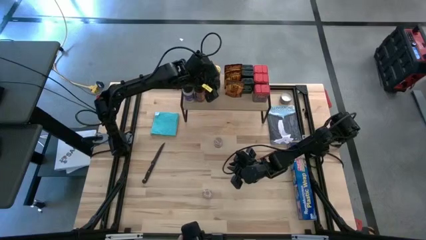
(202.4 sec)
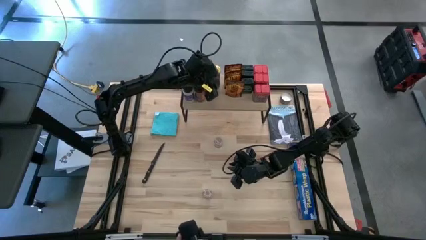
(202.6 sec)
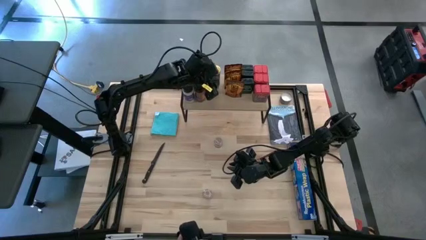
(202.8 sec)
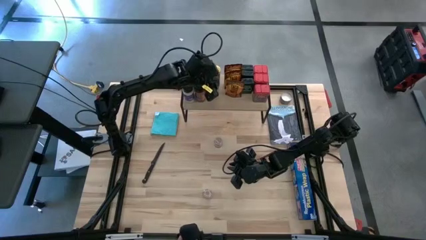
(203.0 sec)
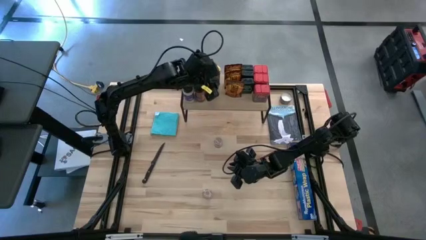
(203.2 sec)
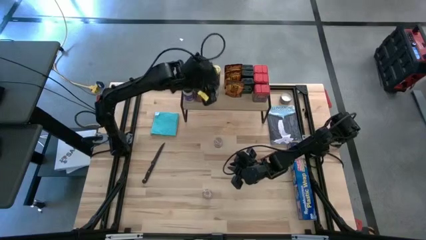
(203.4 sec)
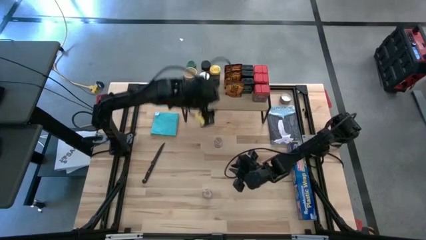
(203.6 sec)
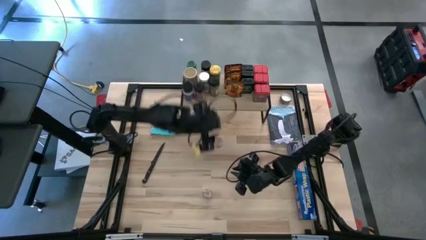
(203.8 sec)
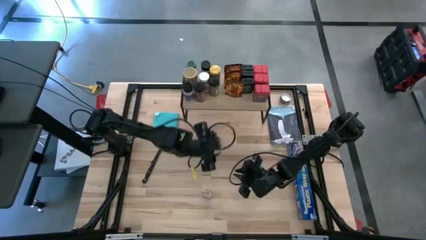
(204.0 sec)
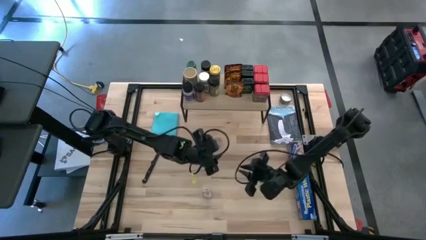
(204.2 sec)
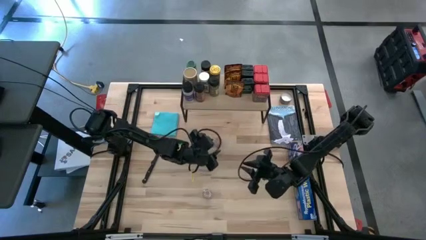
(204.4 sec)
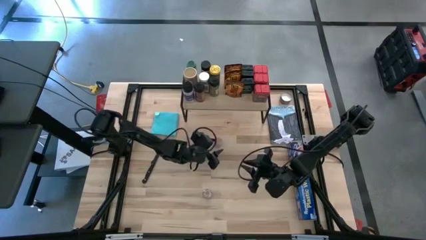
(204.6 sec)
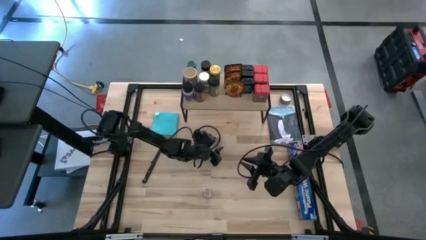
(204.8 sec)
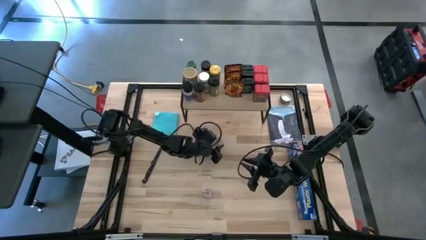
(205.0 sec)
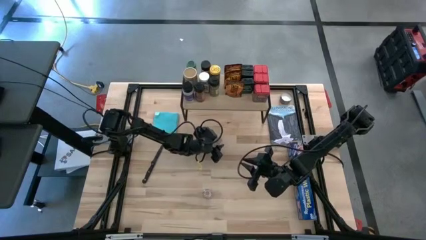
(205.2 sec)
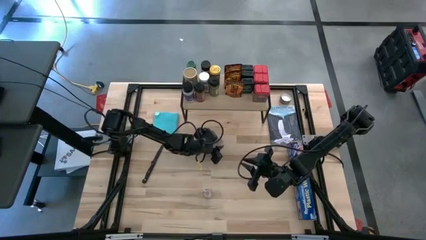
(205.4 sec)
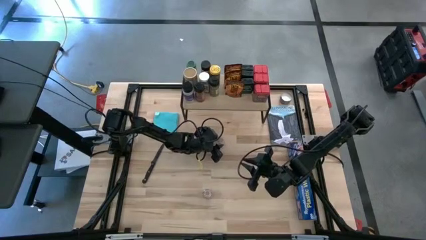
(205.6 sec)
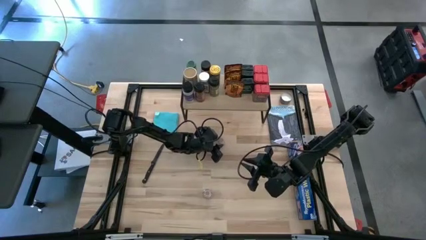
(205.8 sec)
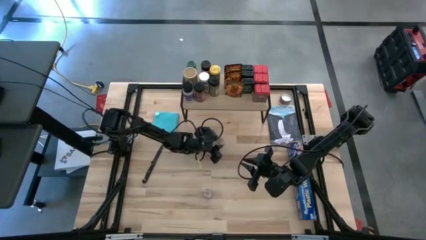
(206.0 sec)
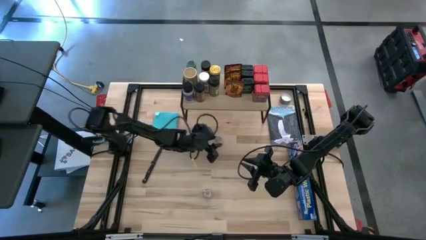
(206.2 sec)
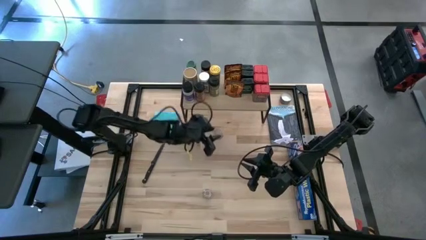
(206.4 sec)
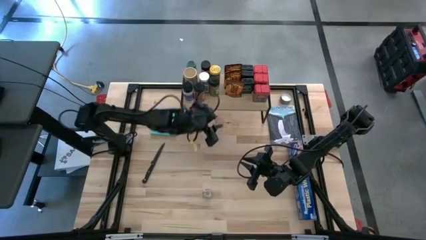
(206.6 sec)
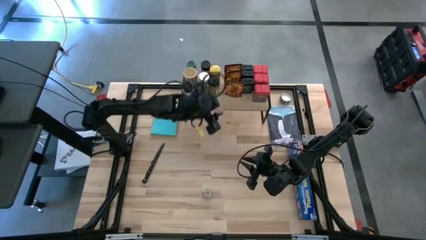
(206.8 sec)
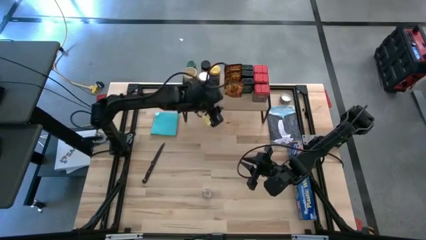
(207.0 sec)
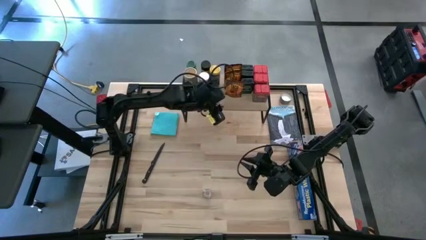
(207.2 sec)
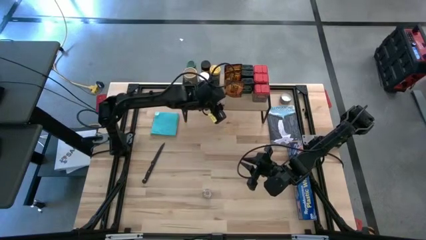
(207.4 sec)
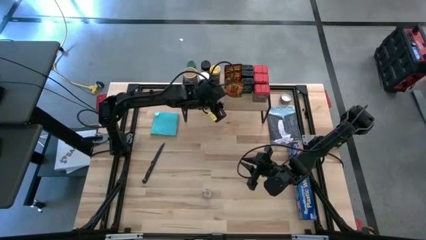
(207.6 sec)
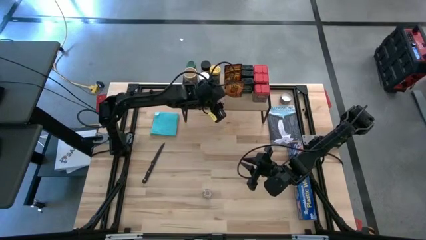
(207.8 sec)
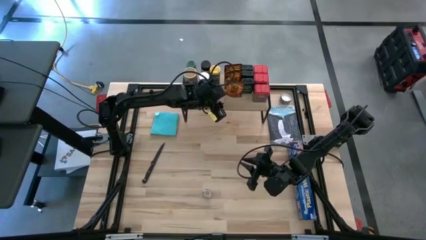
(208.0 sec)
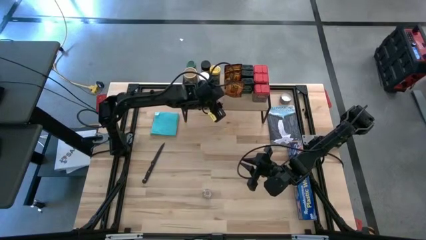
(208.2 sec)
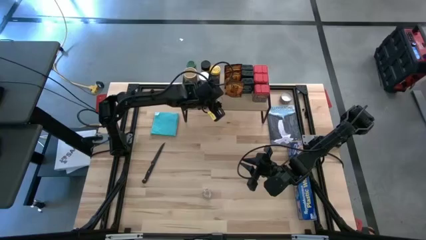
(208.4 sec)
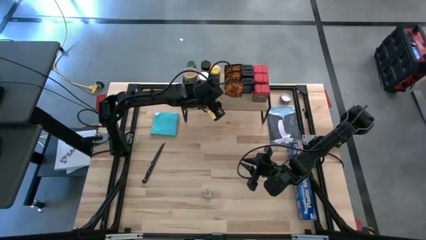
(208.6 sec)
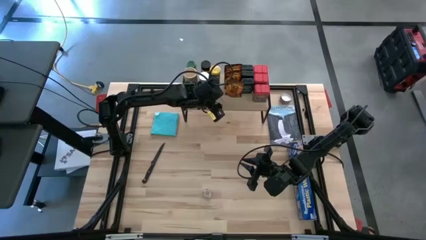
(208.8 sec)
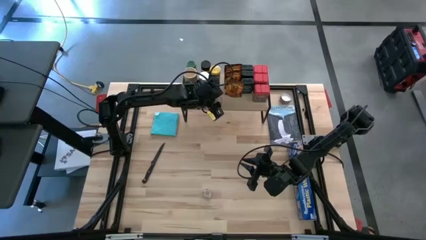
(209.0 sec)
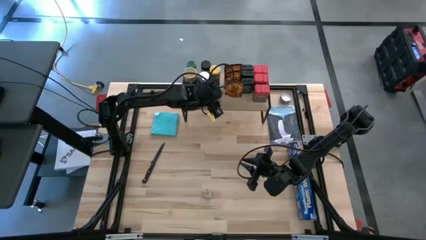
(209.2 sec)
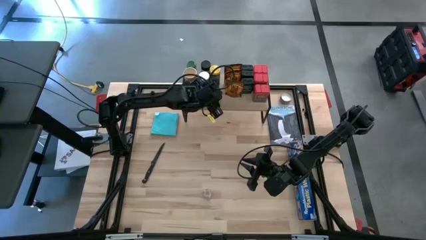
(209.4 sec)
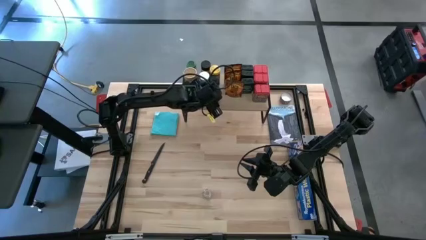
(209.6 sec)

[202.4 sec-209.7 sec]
Task: Shelf spices
Put the brown seasoning bottle on the shelf

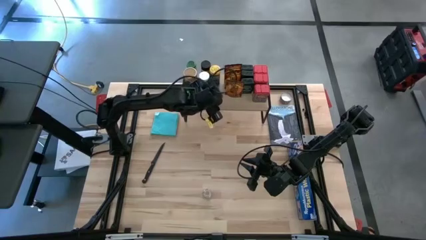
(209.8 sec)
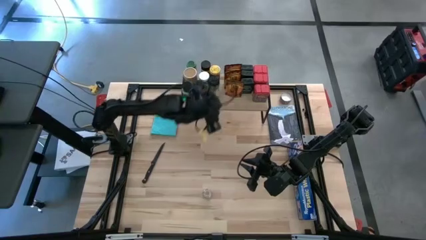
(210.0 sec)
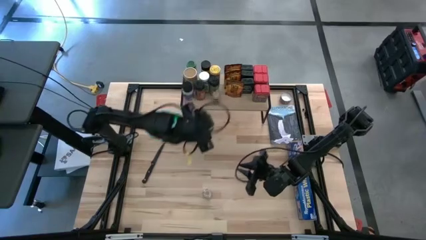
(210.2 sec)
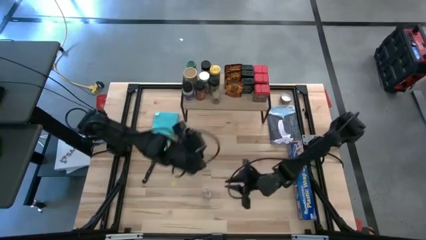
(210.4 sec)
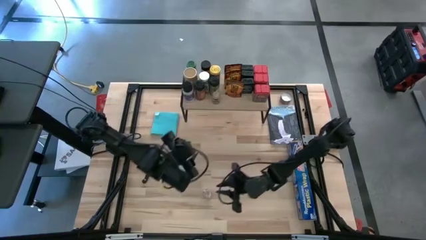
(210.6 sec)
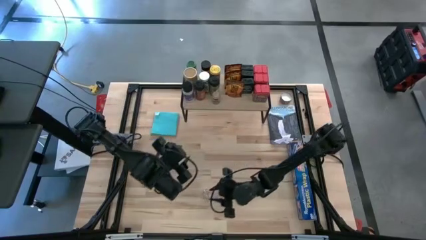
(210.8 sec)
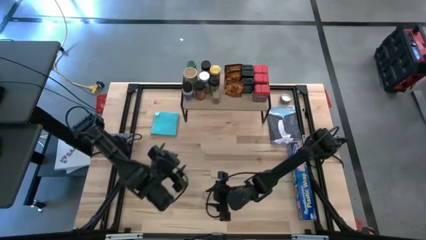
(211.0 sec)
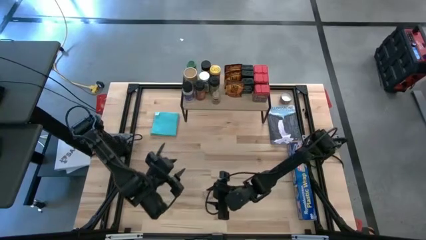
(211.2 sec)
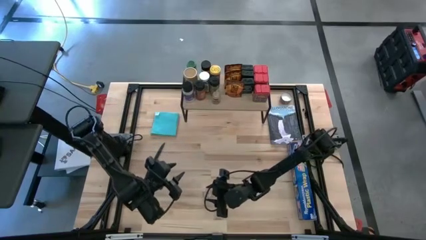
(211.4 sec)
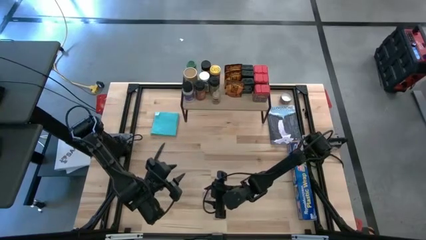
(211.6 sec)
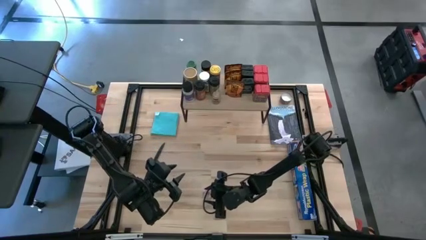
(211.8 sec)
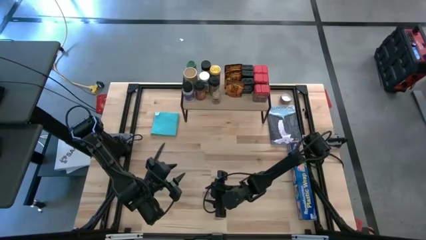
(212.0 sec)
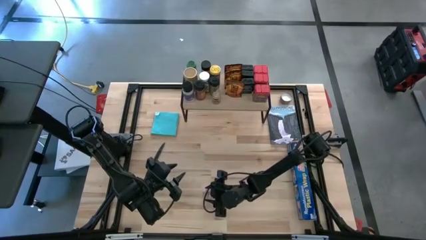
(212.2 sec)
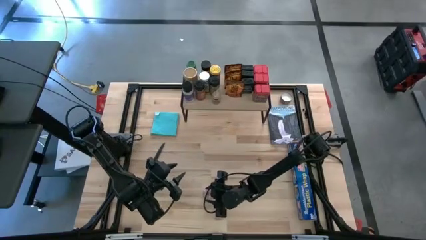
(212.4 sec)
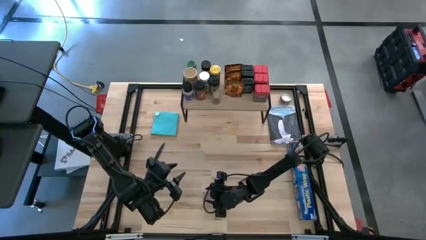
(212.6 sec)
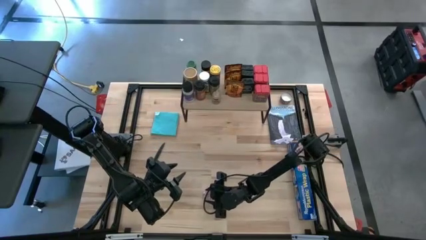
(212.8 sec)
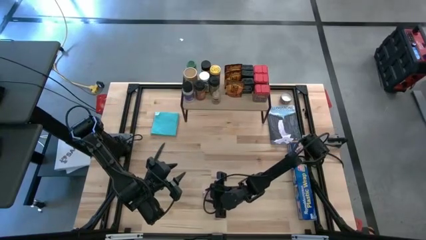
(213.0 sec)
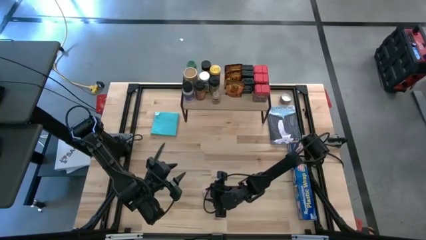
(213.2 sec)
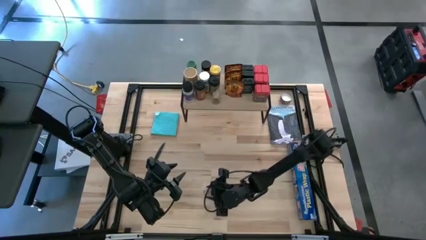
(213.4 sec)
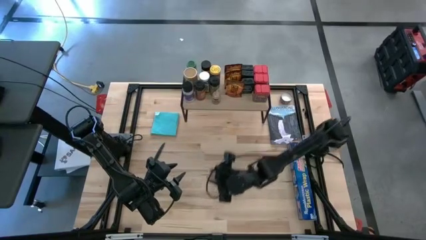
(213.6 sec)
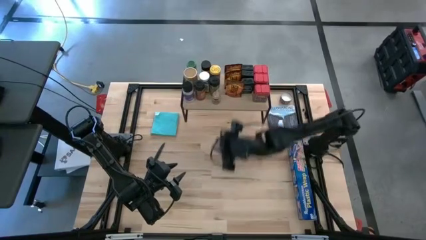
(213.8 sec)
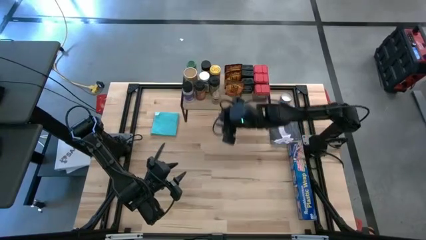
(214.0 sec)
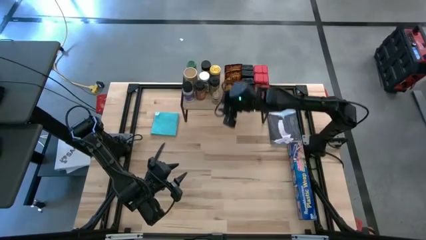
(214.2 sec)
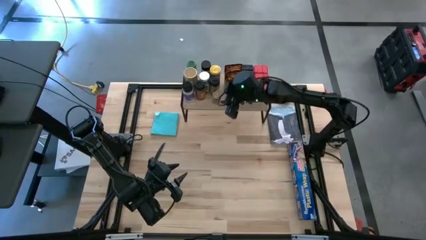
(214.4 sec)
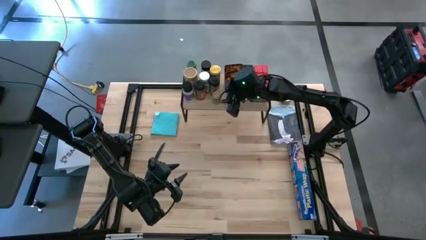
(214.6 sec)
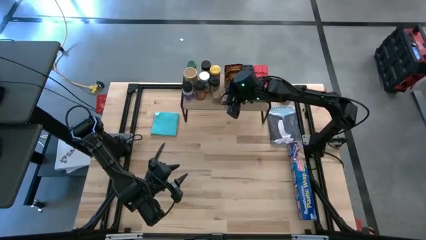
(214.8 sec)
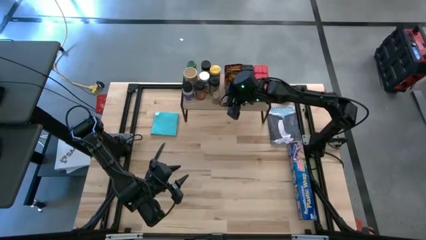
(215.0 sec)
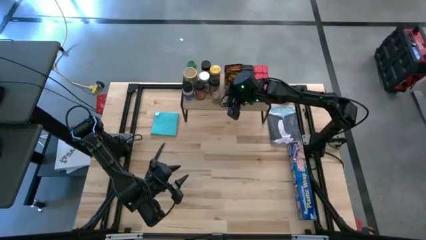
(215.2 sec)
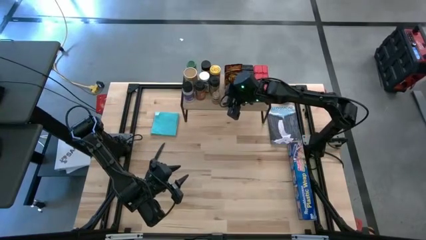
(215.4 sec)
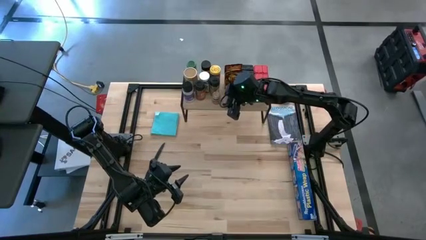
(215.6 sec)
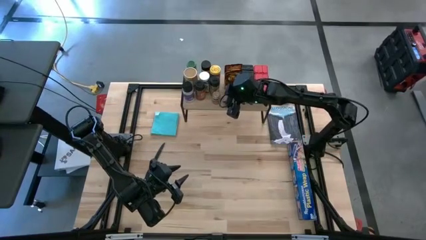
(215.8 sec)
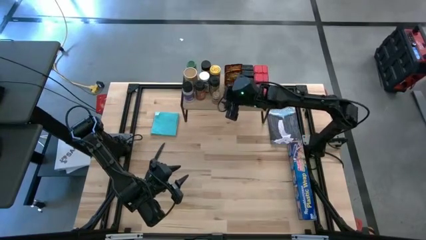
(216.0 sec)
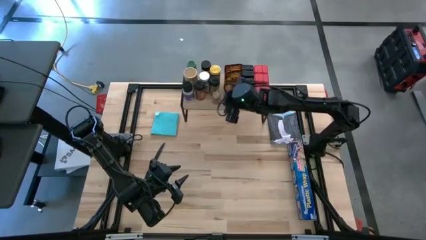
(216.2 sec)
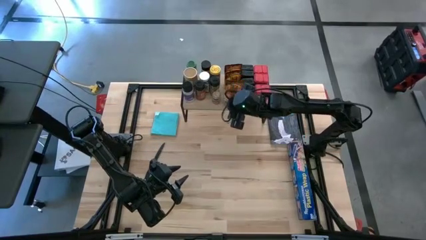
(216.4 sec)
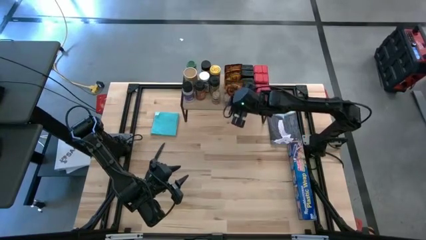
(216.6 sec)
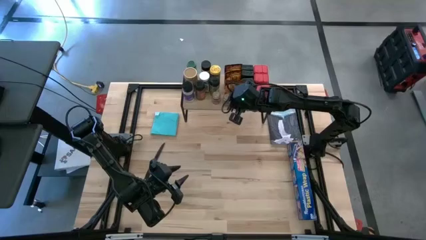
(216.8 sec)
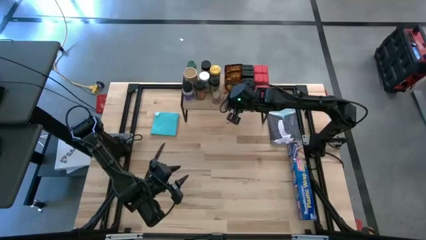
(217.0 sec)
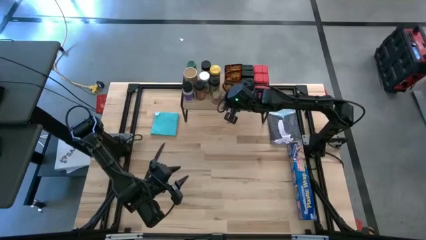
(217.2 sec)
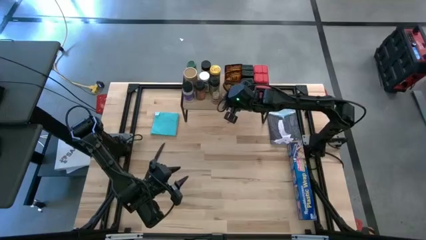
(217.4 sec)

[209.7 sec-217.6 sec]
Put the brown seasoning bottle on the shelf

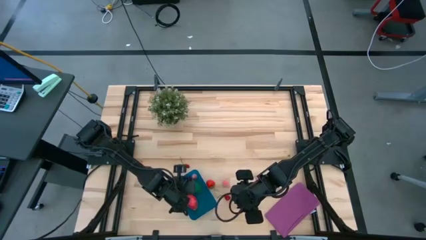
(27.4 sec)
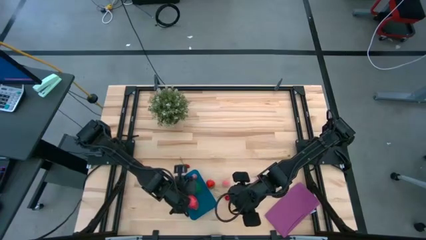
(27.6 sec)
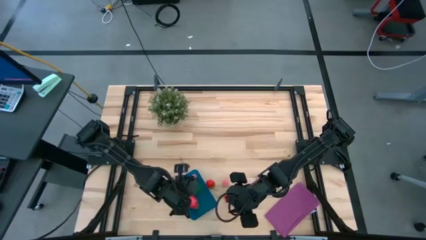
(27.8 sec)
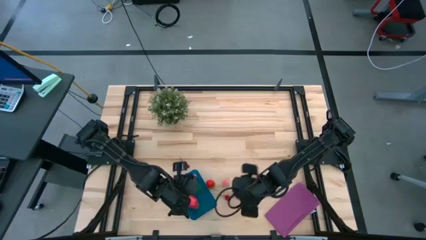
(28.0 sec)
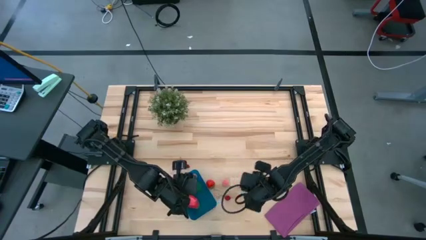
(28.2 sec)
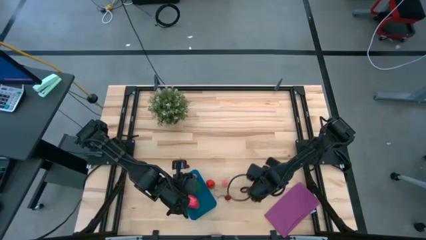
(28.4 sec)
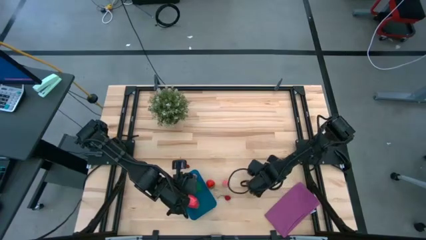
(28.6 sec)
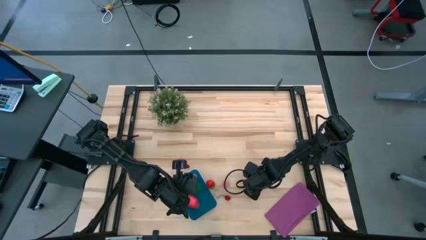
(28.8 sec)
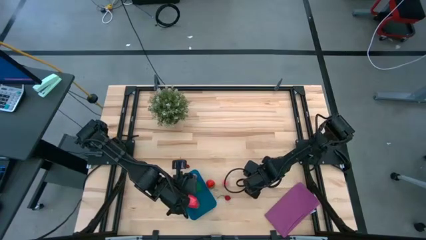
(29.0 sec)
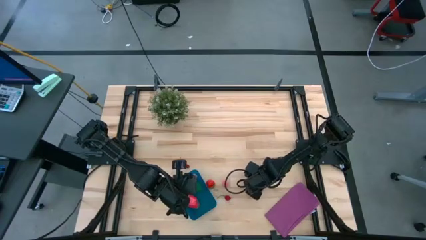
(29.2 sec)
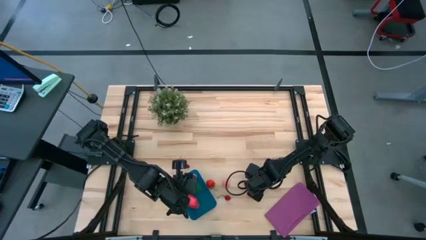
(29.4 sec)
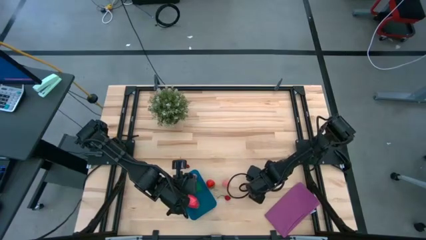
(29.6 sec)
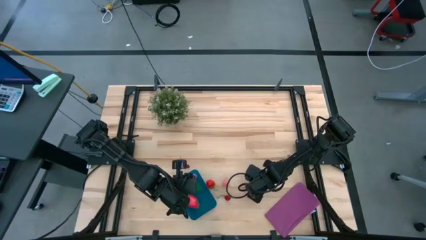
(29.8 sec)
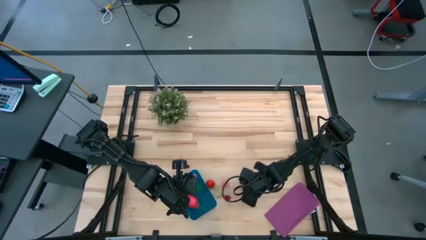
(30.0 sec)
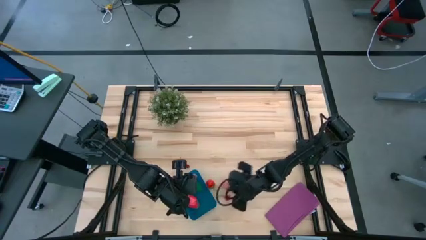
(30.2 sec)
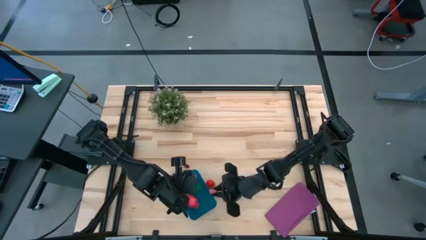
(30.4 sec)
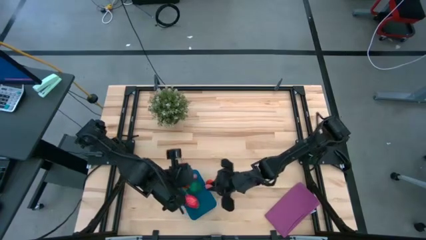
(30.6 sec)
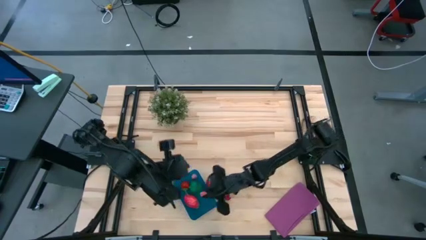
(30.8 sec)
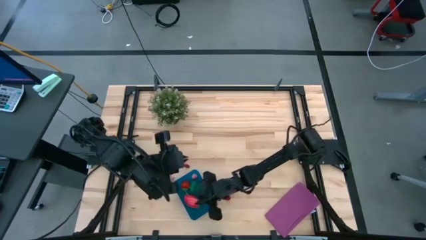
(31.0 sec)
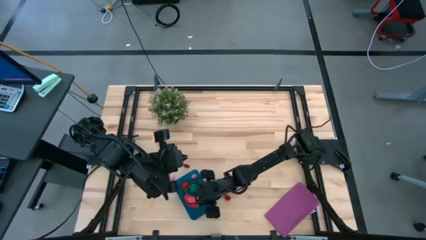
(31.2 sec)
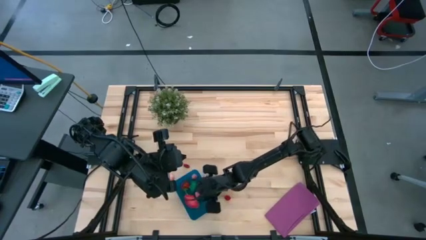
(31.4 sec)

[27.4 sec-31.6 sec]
Task: Pick and placing Produce into tupperware
Put the pink peach into the blue bin
